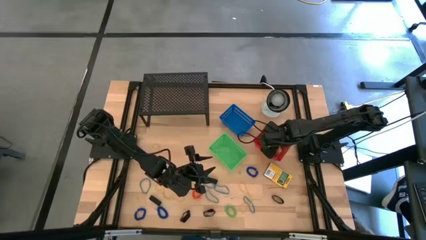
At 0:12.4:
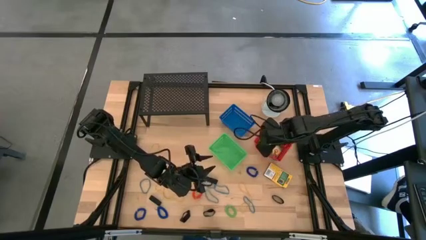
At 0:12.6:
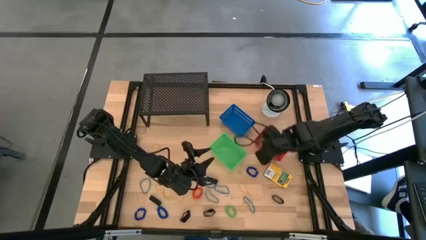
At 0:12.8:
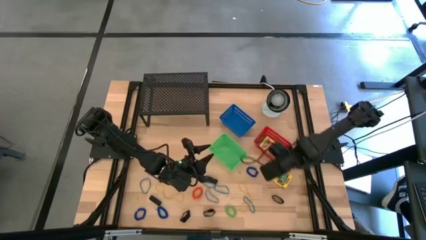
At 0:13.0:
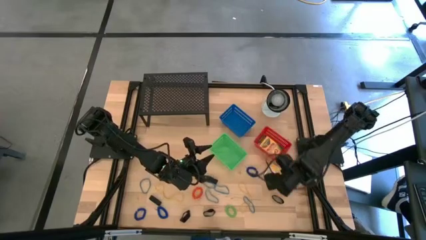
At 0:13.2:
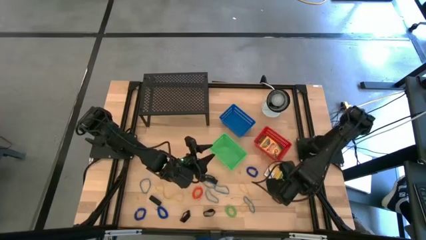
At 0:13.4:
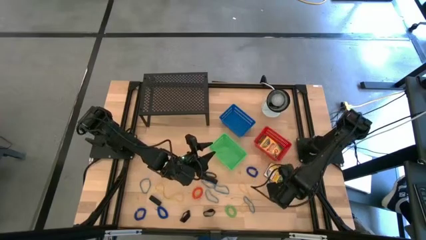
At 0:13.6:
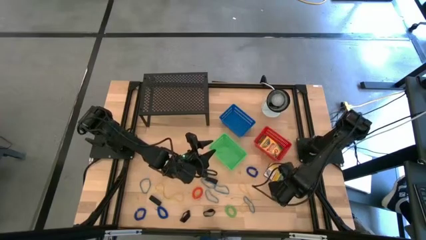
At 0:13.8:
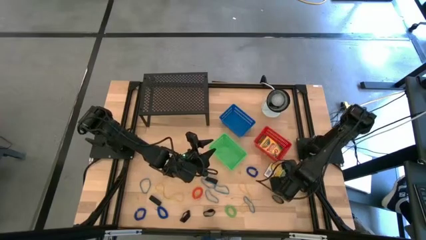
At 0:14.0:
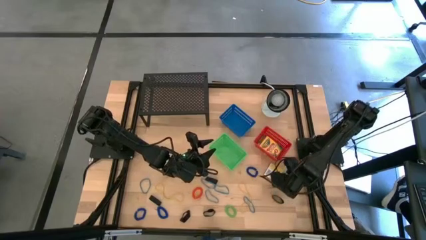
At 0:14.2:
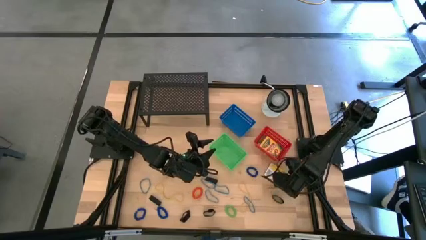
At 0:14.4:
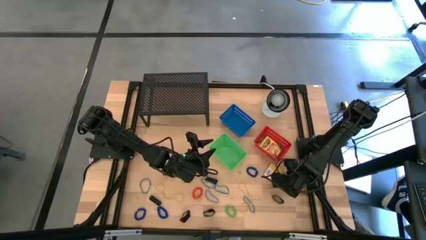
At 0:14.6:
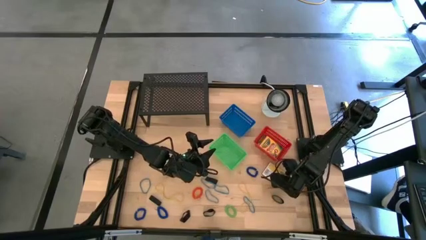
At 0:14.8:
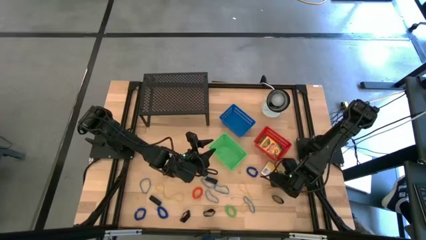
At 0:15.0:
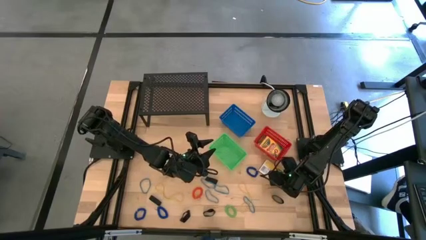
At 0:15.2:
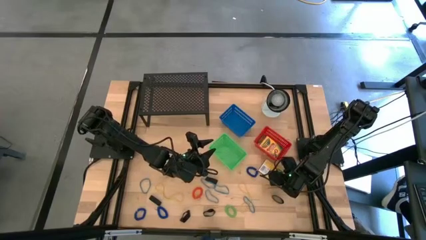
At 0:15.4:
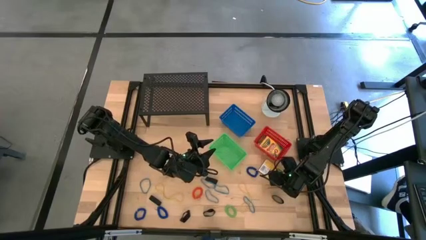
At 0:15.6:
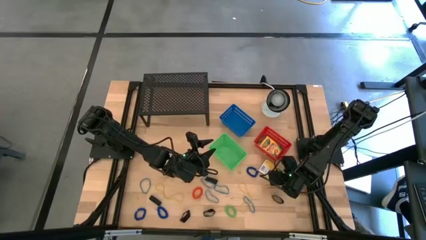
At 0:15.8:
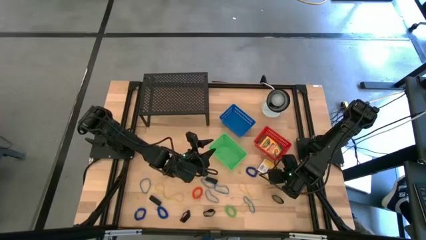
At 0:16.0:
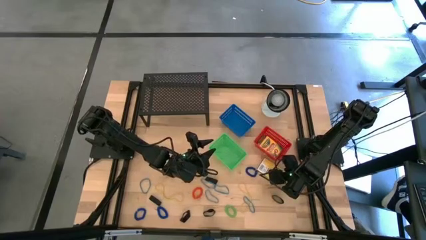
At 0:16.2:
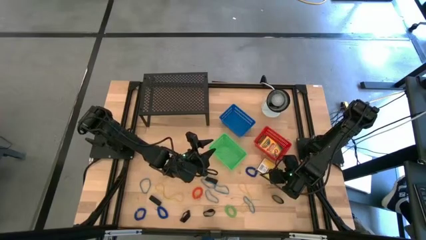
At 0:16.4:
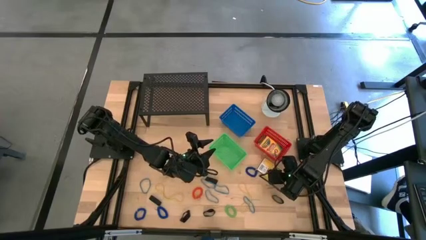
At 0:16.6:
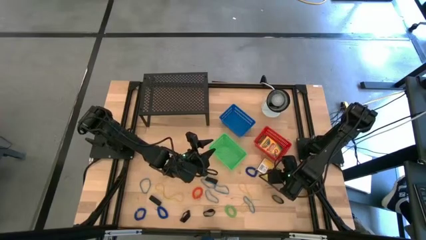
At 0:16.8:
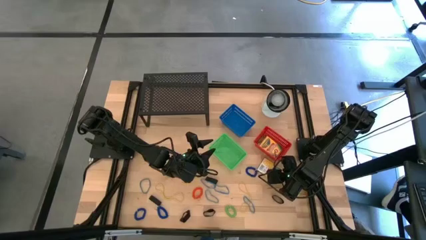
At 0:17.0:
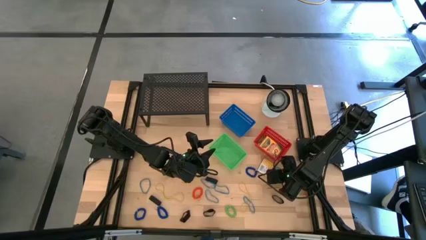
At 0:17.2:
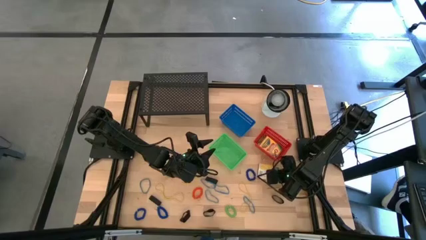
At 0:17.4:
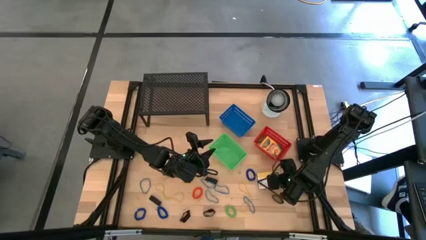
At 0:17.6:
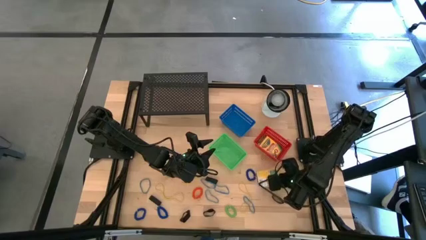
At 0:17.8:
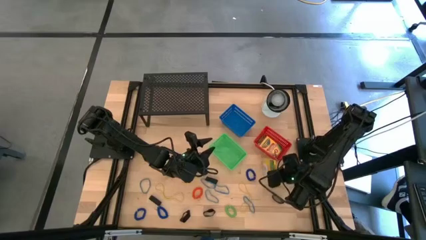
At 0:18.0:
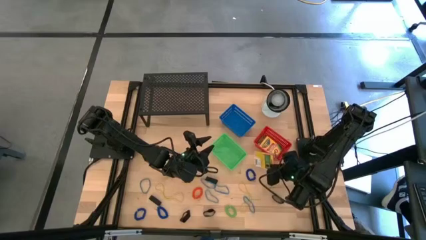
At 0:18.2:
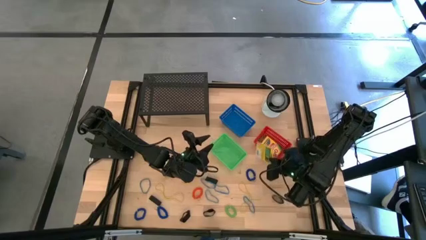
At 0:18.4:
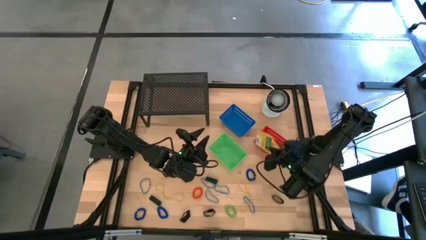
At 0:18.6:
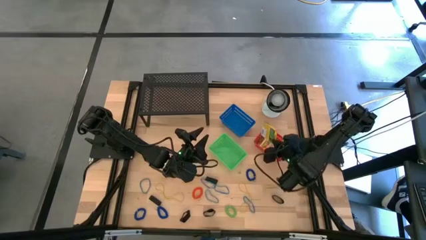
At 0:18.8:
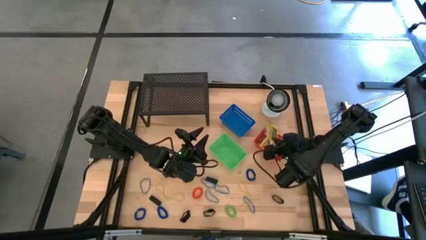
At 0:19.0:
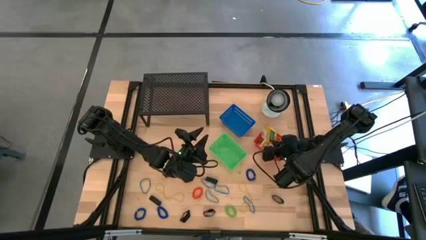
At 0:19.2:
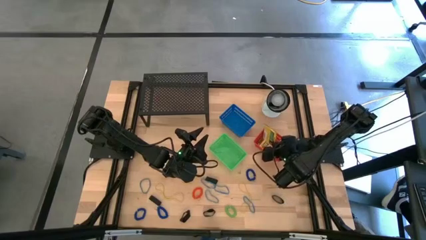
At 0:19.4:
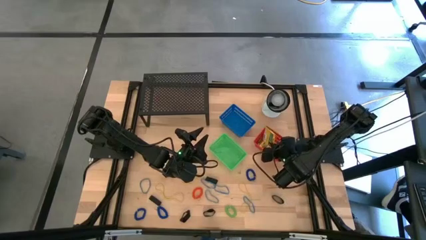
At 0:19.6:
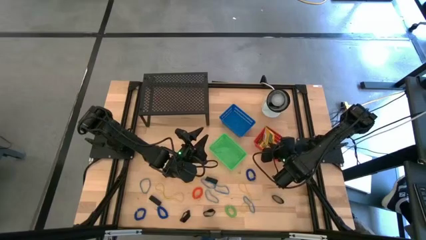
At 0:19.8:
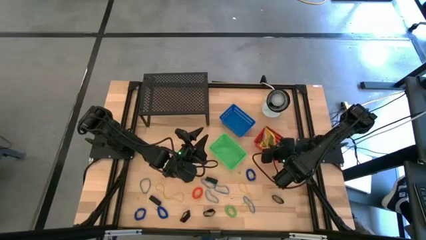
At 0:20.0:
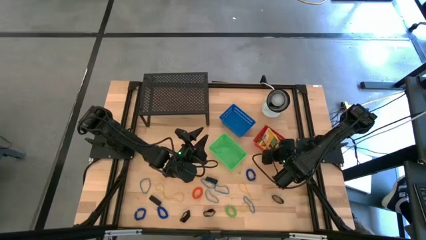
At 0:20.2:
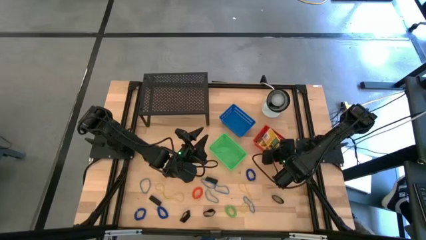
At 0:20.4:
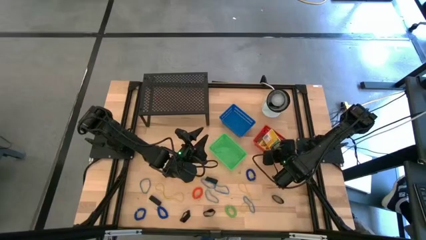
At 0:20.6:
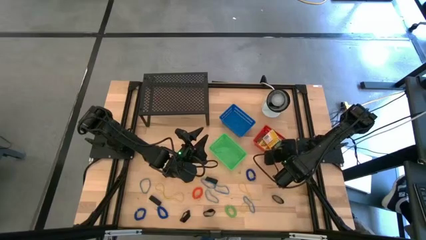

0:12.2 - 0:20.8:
Task: Pick & Place Office Desk Supplies
Put the crayon box into the red basket

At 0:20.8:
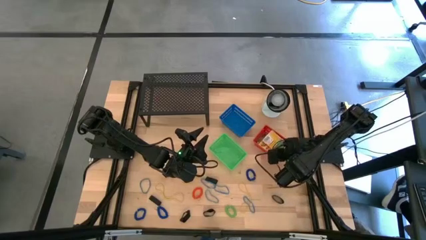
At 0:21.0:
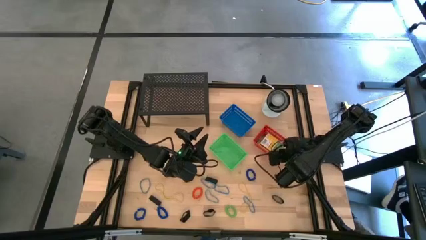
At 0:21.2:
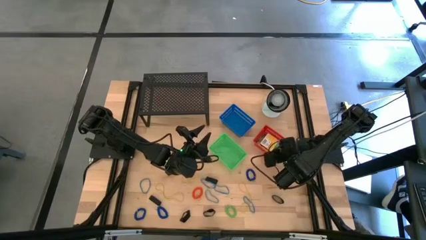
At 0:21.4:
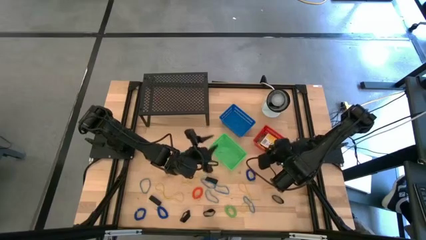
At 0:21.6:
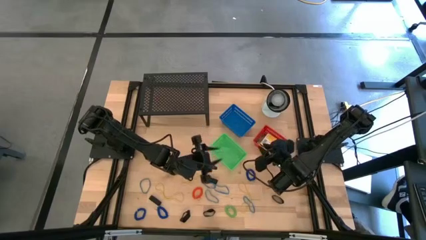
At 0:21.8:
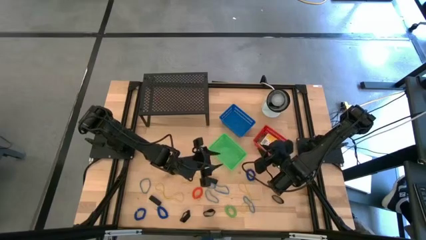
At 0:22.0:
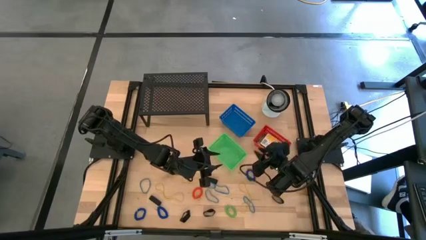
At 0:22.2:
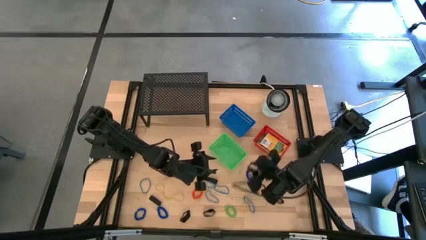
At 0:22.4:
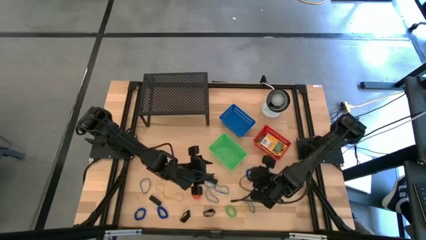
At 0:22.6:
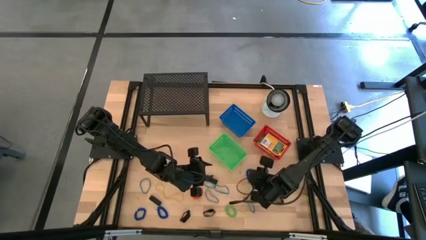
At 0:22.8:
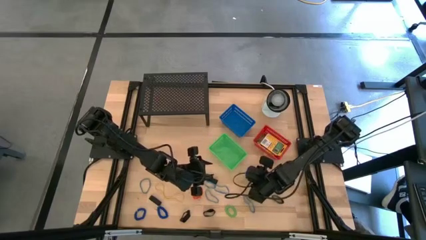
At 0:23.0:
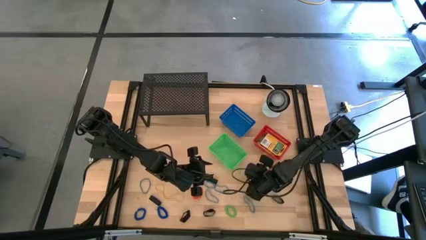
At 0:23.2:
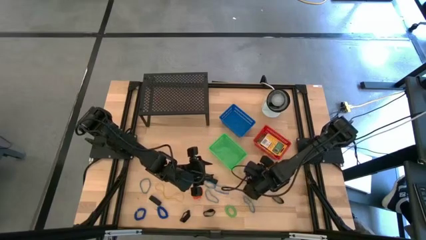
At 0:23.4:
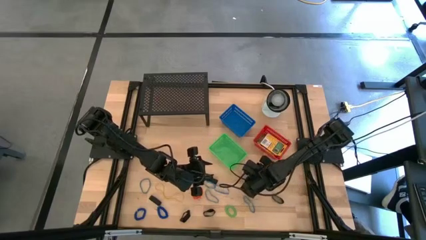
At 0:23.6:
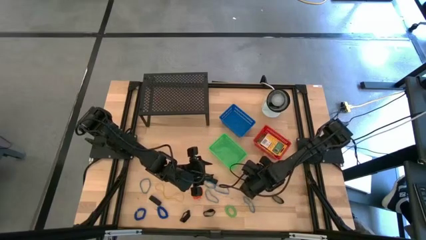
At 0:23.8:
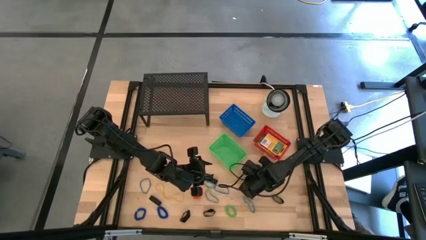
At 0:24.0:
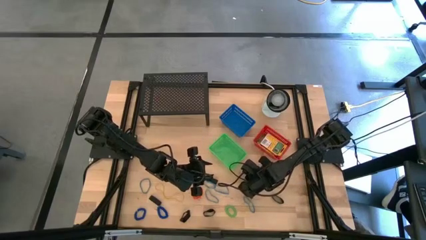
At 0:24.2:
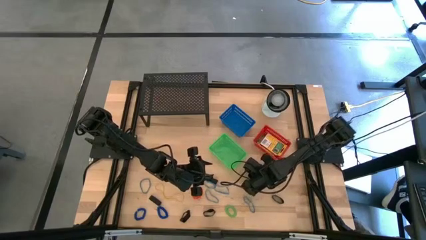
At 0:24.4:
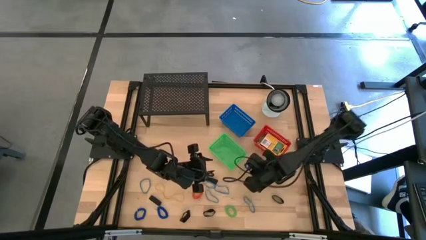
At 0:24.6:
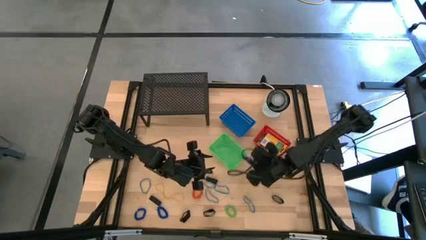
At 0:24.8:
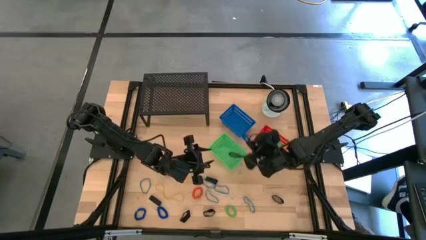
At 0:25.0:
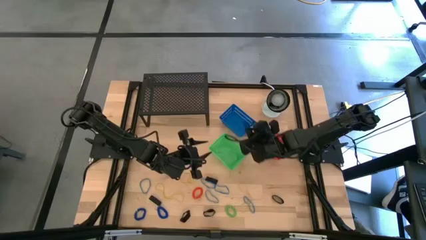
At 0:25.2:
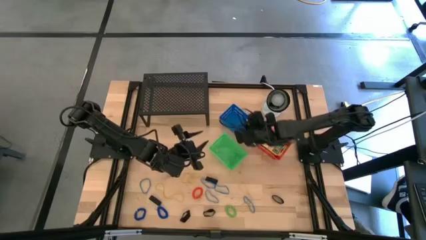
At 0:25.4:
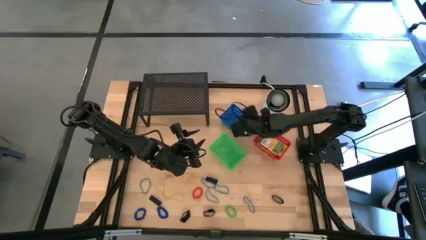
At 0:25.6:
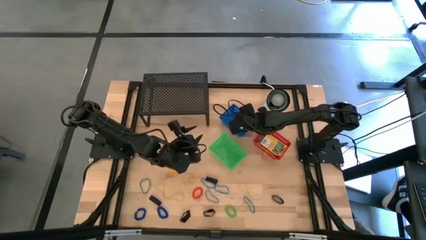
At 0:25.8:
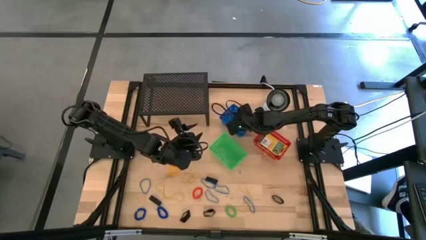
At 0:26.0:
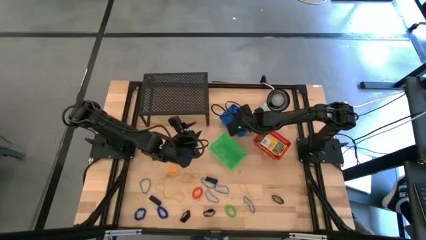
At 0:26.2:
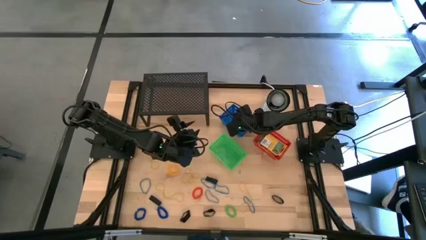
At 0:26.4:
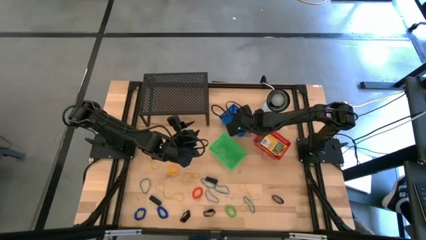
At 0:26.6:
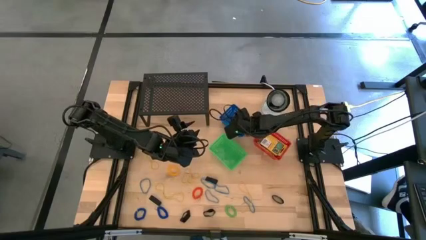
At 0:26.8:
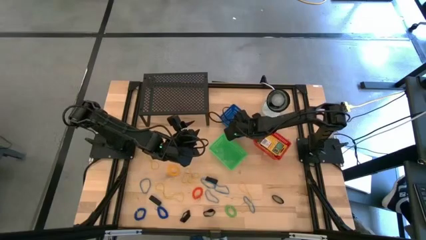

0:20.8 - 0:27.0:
Put the blue spring keychain into the blue basket
